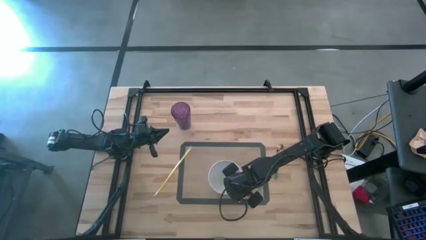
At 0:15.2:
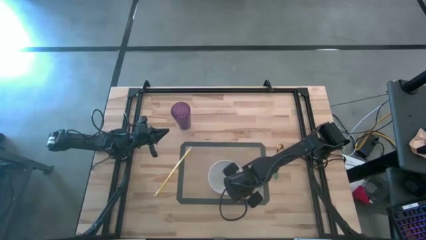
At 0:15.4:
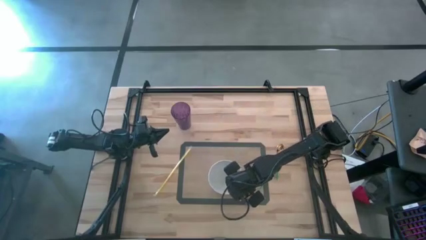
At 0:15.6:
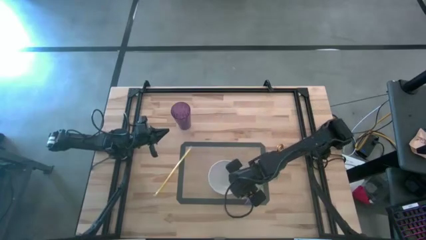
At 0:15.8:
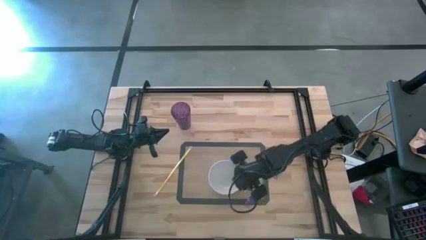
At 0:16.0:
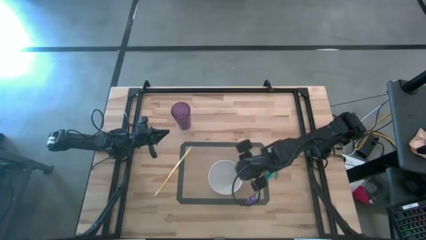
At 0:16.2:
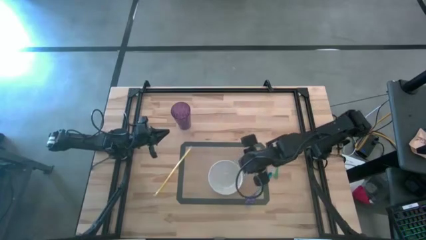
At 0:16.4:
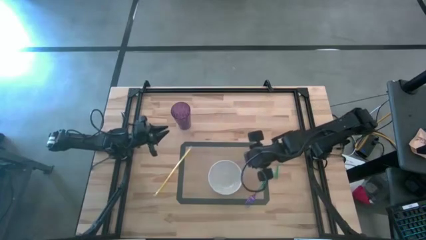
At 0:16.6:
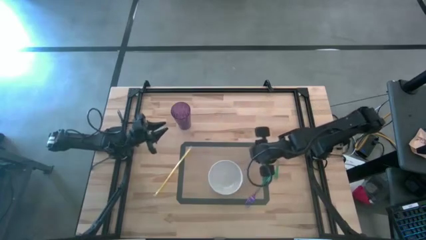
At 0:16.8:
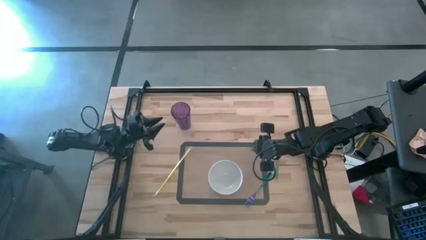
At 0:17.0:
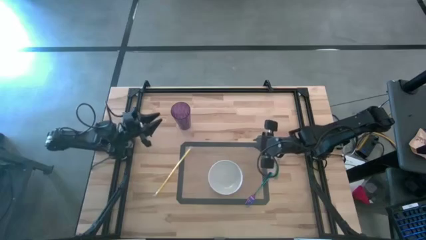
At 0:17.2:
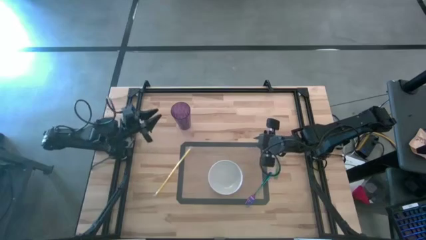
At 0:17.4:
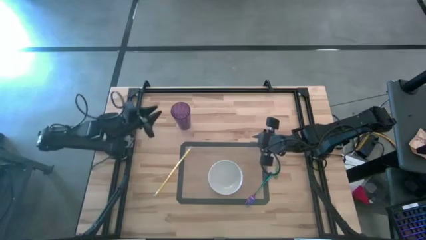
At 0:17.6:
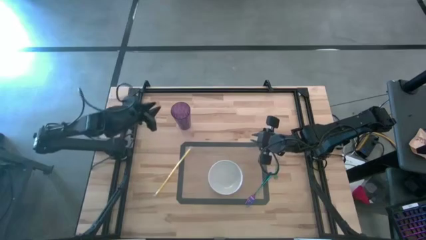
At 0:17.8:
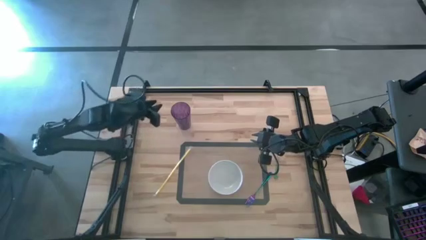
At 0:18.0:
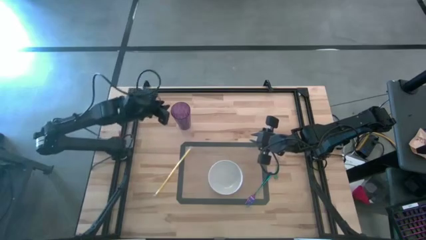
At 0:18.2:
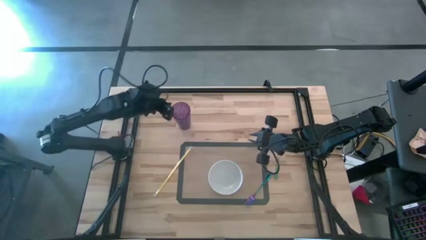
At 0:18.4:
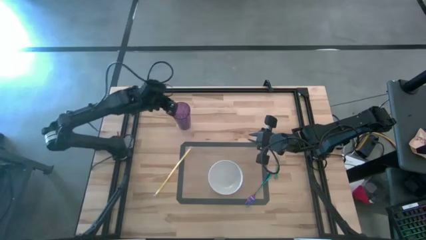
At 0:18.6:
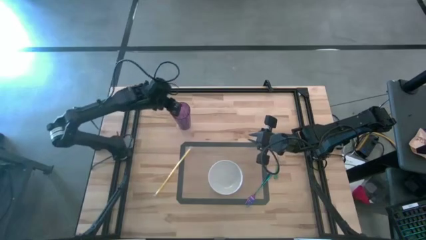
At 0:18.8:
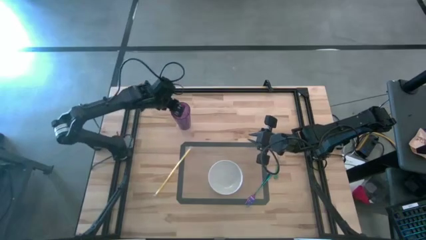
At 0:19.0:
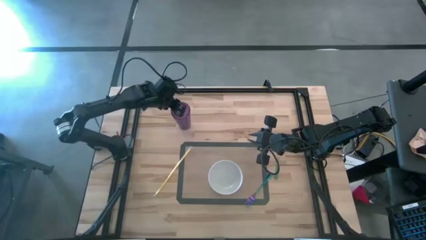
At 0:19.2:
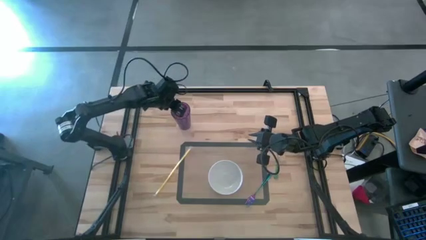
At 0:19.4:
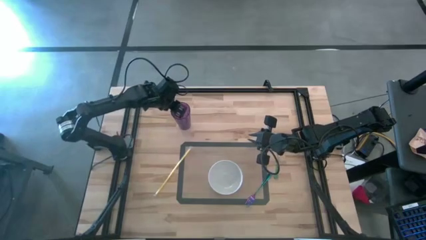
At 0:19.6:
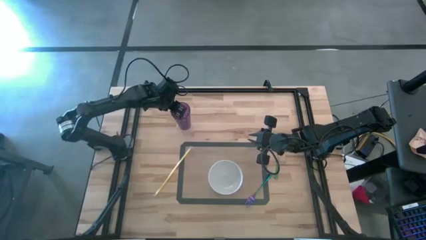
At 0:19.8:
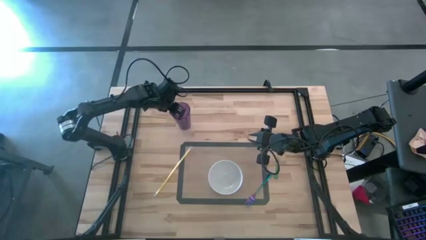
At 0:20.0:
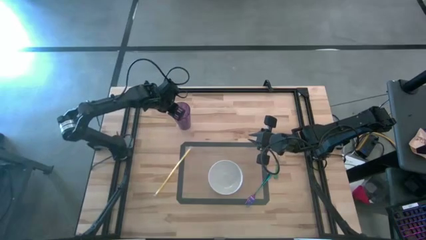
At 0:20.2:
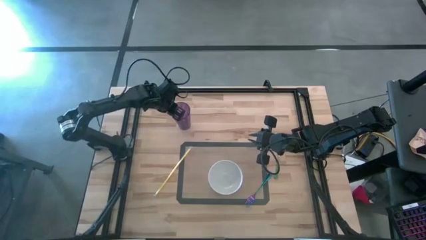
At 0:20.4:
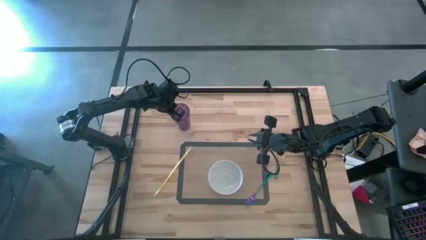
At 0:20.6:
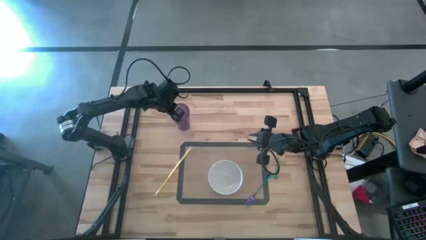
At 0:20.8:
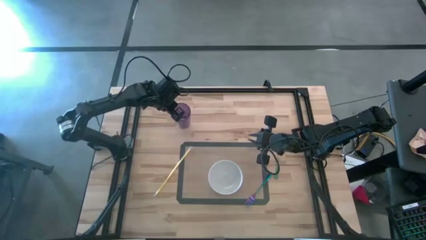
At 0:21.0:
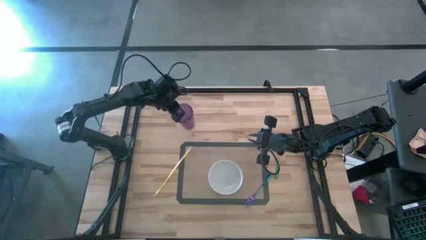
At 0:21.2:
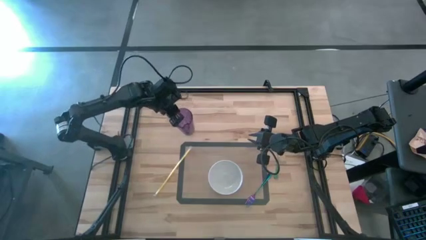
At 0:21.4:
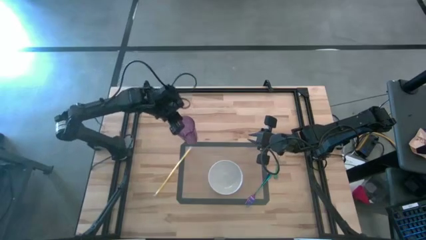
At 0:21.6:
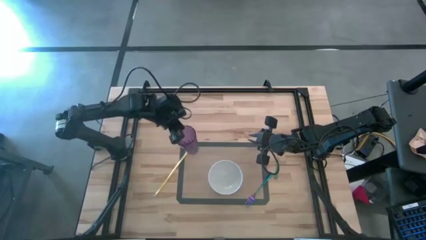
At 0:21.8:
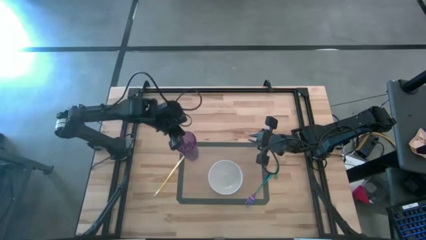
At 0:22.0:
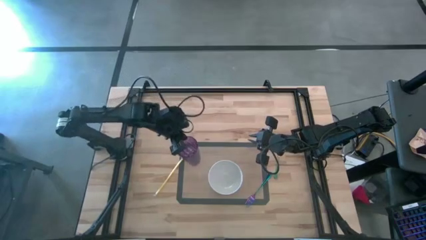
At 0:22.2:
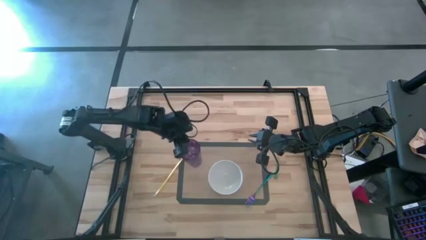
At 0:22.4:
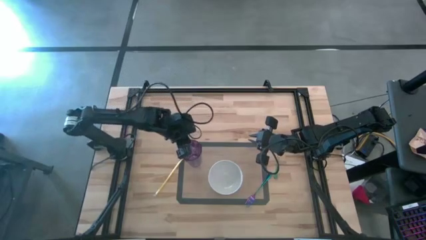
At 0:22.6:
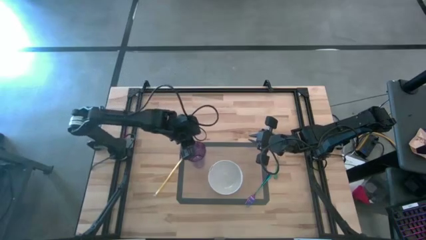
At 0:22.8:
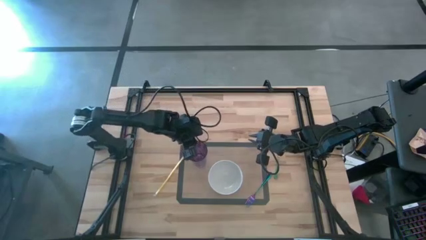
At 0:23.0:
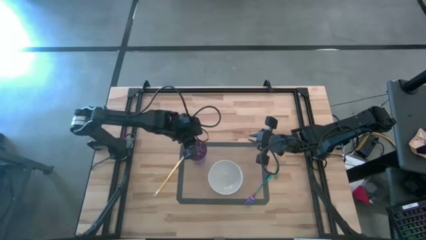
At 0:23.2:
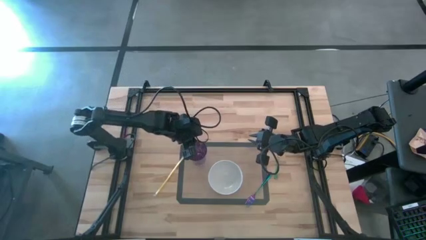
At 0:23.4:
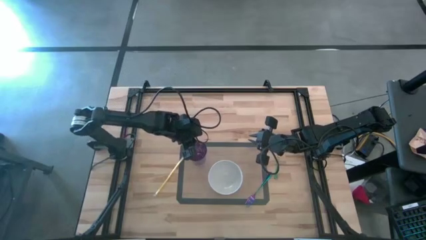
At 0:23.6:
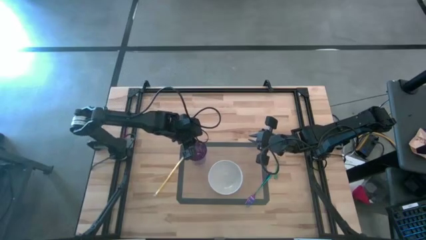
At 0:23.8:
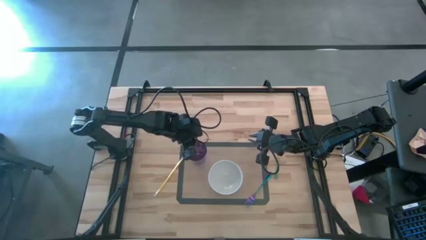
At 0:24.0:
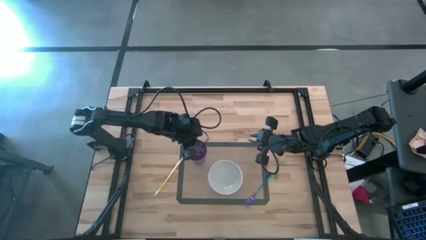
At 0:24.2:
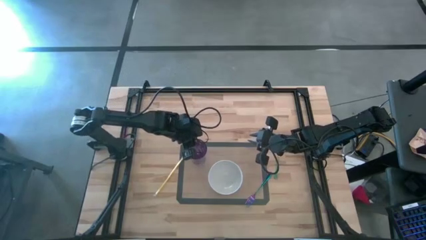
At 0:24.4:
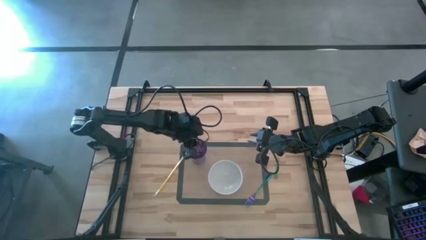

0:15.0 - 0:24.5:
Task: Pick & Place Utensil
Put the violet cup on the transparent mat to the top left of the white bowl

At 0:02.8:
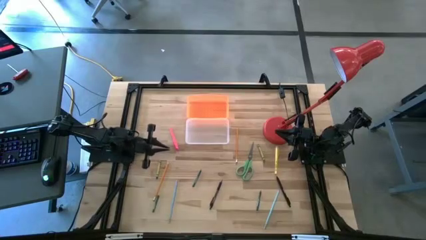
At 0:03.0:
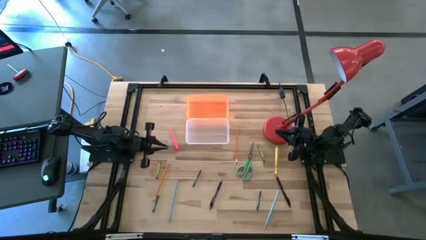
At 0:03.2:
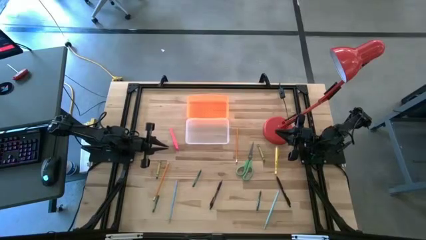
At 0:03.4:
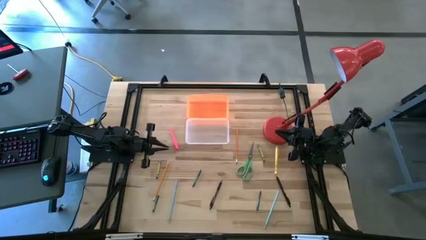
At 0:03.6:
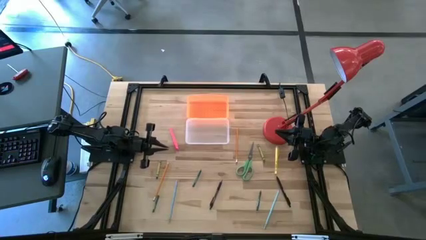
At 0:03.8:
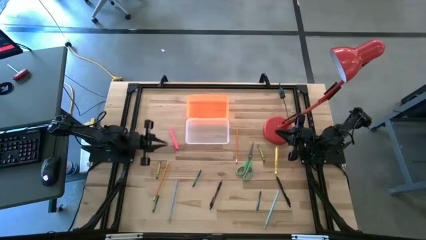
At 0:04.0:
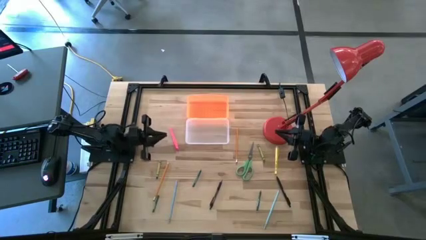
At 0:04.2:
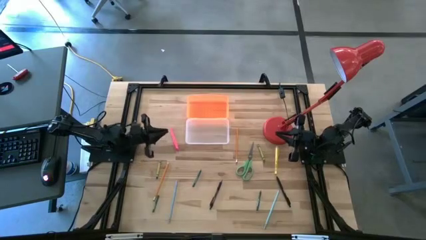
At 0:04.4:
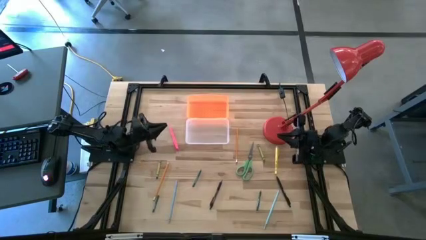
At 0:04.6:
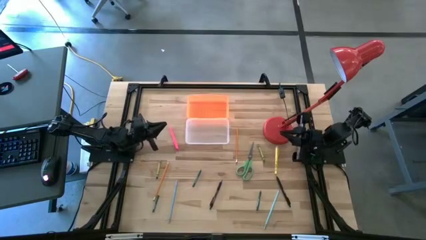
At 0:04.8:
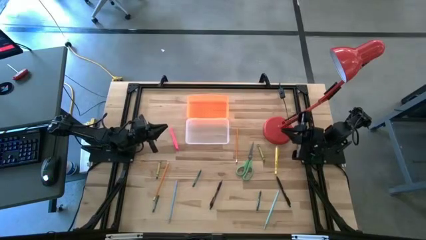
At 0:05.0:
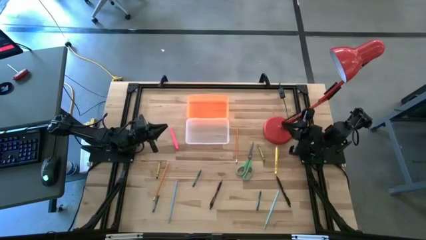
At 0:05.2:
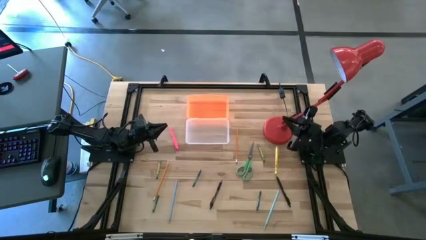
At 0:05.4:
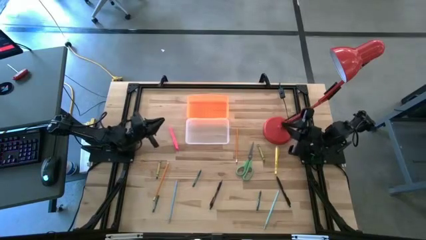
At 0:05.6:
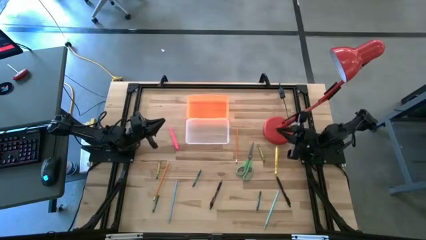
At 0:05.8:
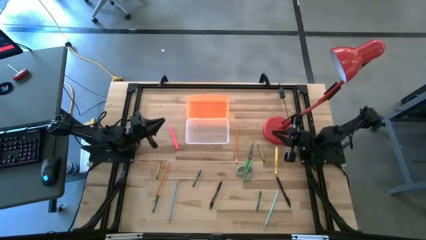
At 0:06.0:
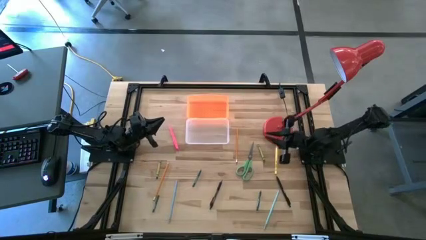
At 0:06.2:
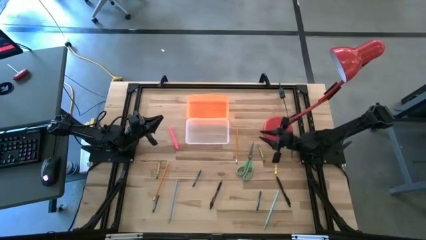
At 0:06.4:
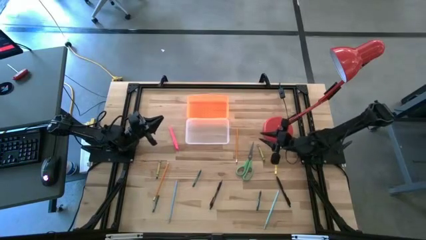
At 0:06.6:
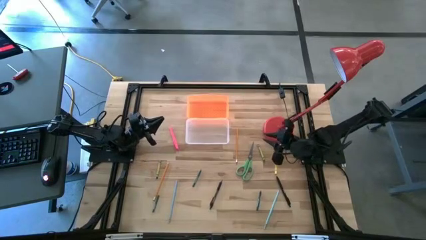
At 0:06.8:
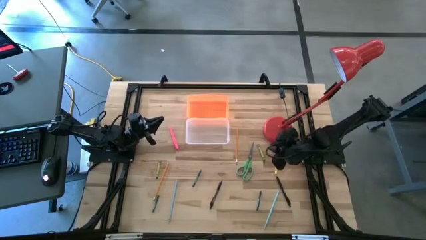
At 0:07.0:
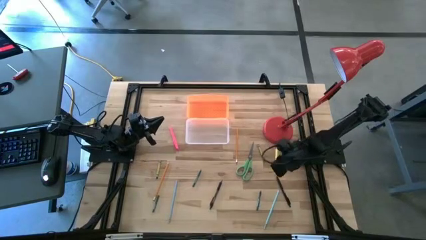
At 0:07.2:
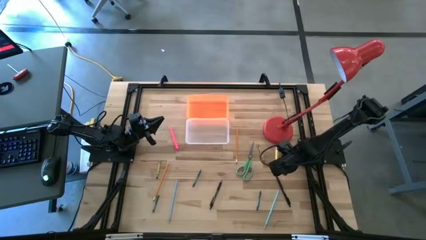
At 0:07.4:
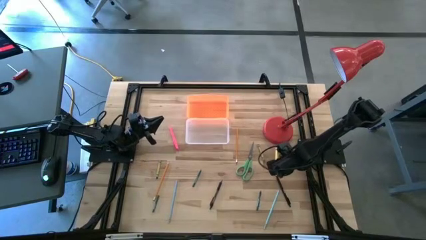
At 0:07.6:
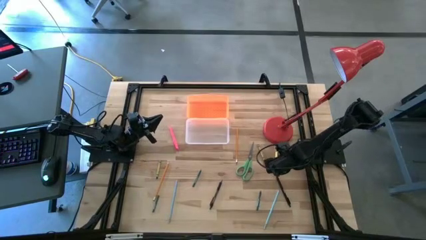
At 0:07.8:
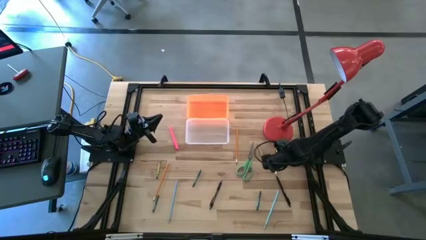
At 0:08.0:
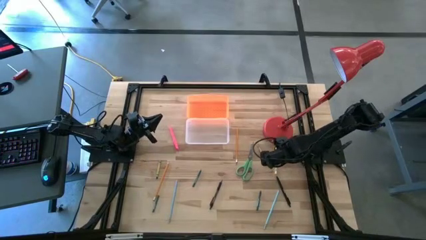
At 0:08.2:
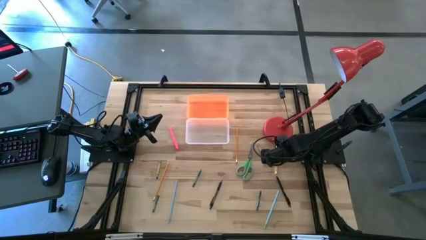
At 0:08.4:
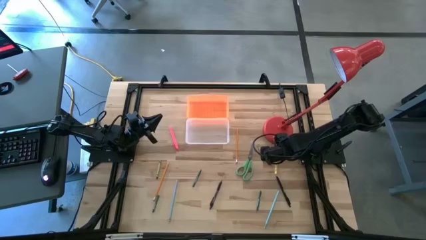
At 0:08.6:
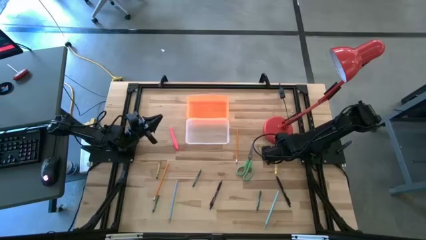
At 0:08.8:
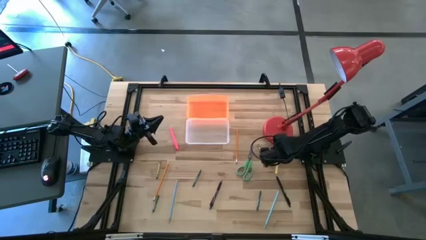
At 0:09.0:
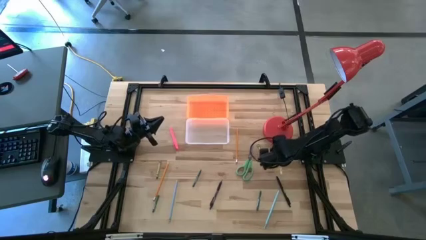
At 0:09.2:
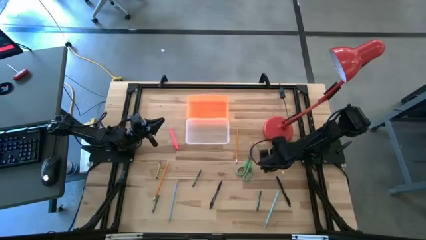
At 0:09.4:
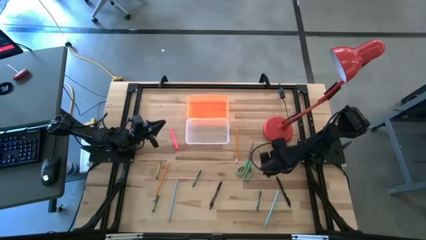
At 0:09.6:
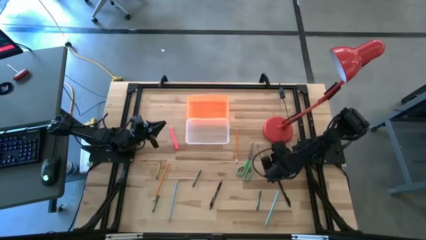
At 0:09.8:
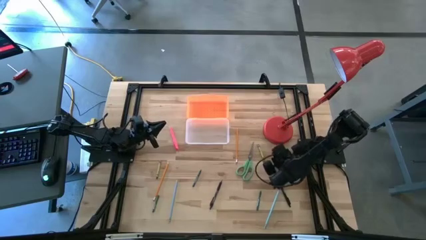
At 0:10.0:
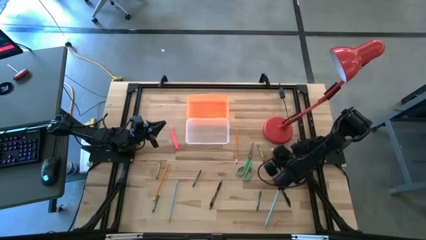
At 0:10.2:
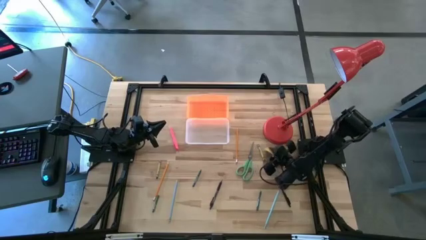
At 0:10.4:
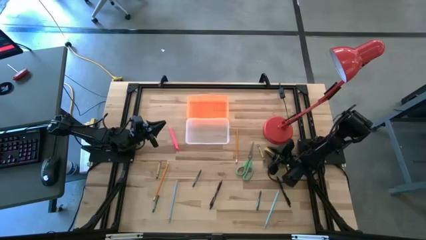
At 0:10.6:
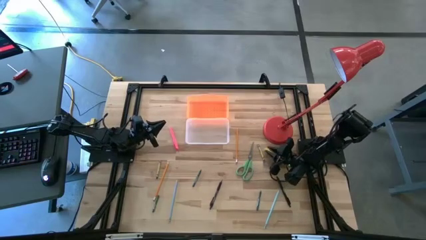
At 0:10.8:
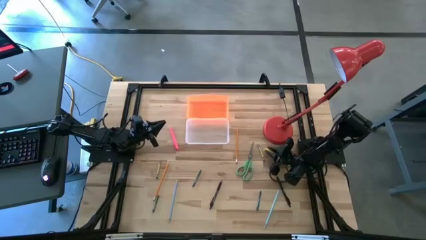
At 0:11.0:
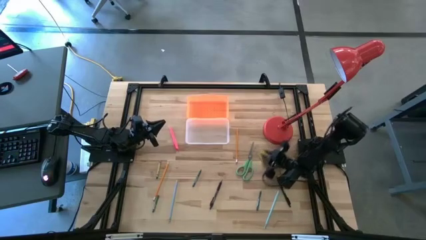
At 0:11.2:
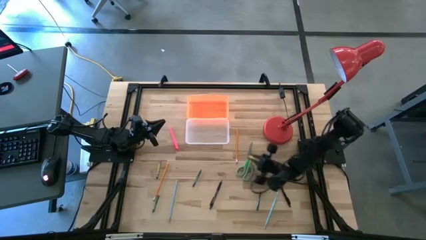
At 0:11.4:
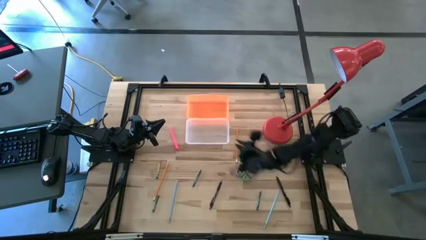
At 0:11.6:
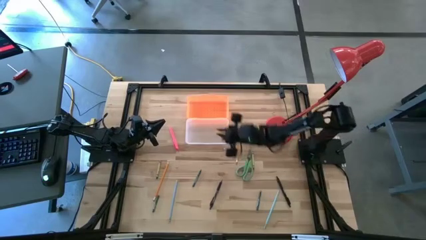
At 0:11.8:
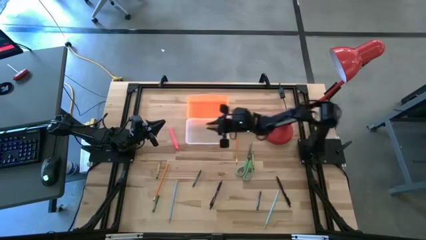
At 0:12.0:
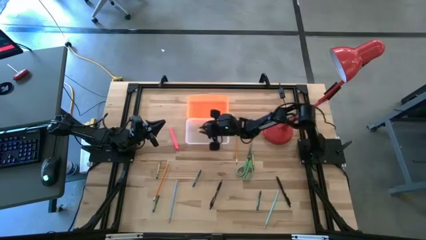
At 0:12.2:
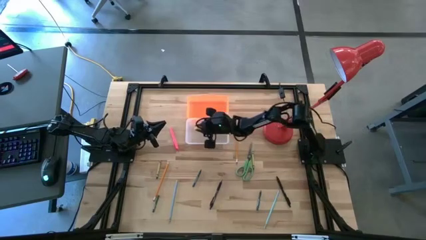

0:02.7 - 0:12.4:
Task: Pick & place school supplies into a supply box
Put the yellow pen into the orange supply box
